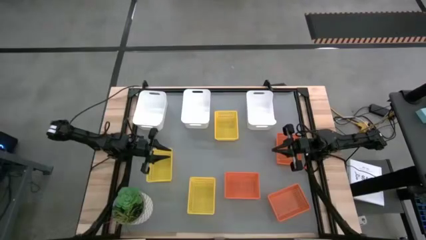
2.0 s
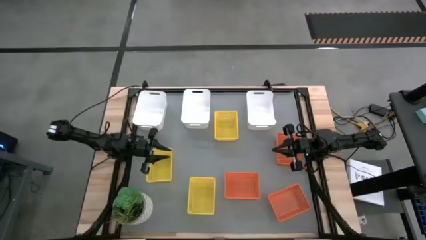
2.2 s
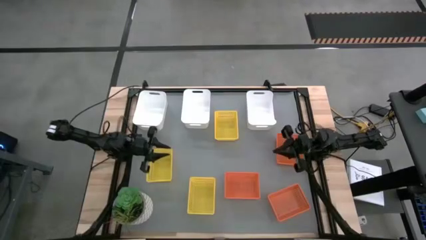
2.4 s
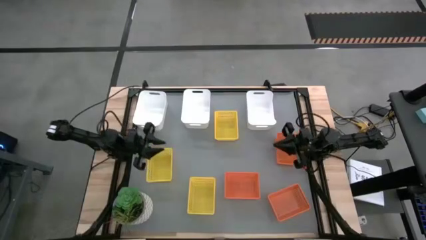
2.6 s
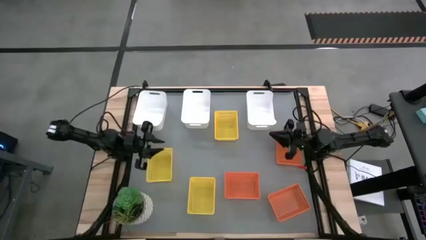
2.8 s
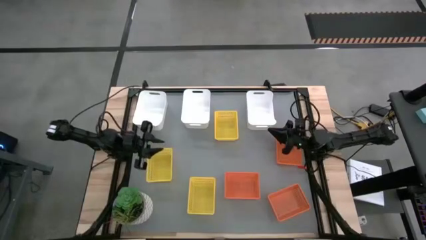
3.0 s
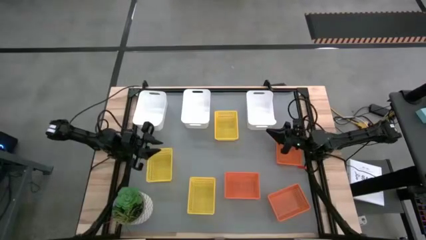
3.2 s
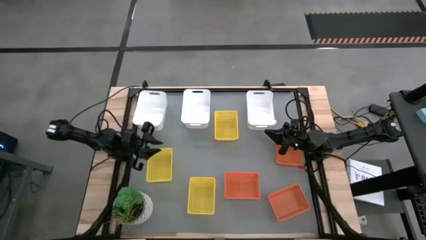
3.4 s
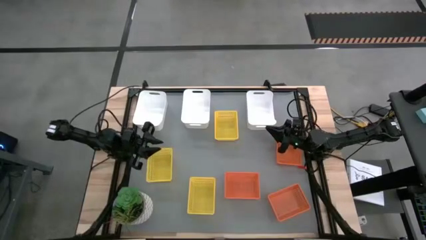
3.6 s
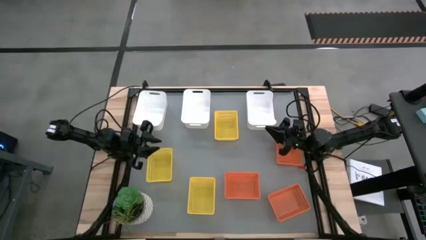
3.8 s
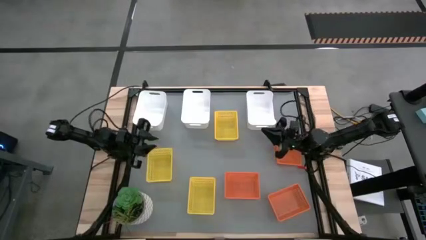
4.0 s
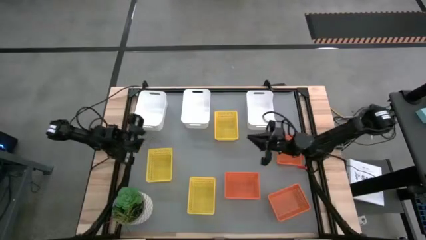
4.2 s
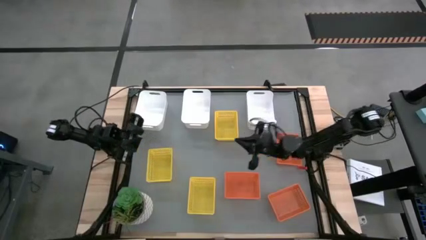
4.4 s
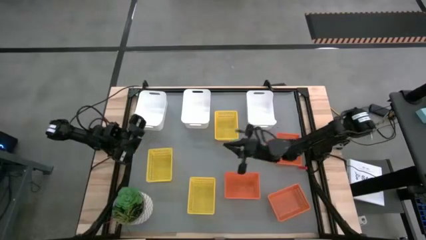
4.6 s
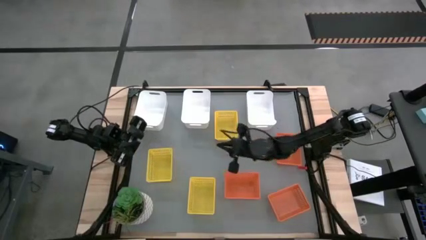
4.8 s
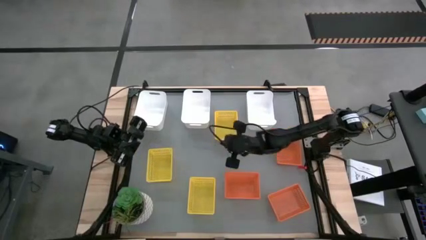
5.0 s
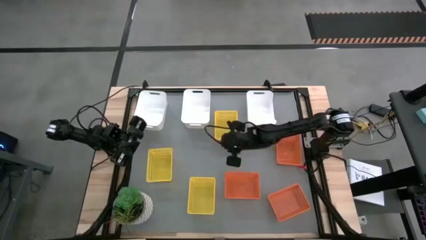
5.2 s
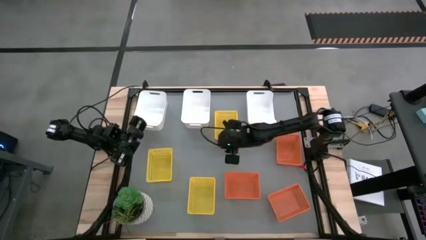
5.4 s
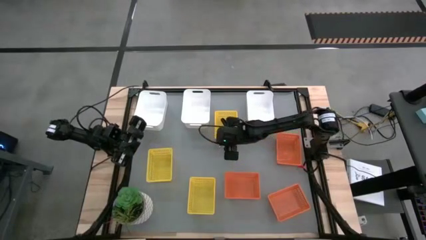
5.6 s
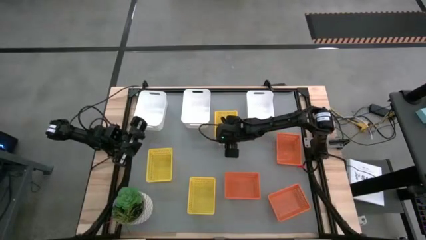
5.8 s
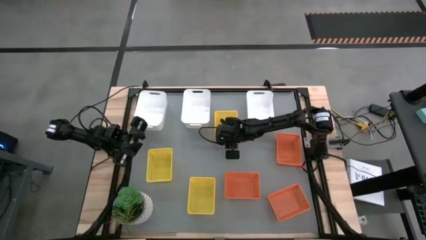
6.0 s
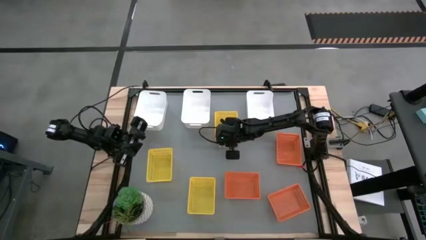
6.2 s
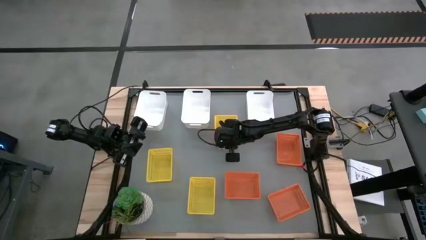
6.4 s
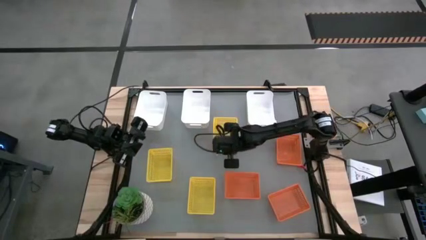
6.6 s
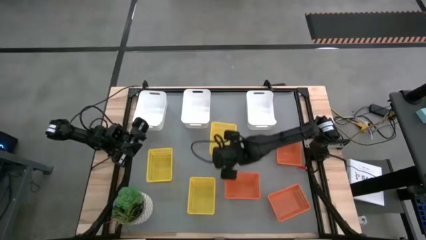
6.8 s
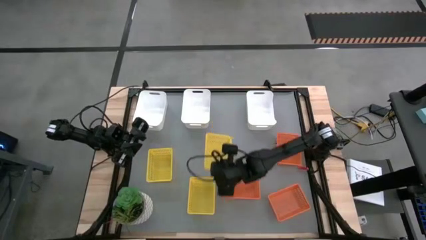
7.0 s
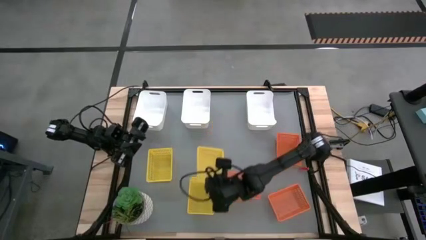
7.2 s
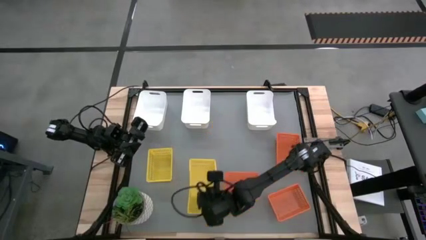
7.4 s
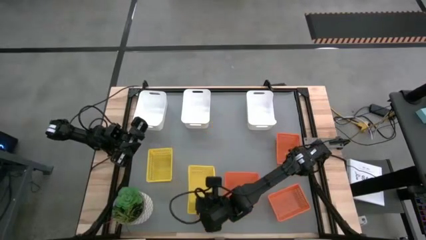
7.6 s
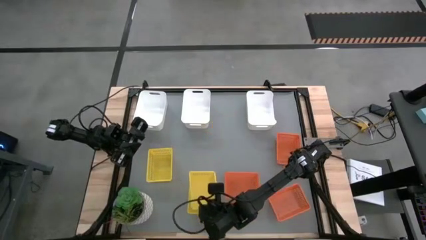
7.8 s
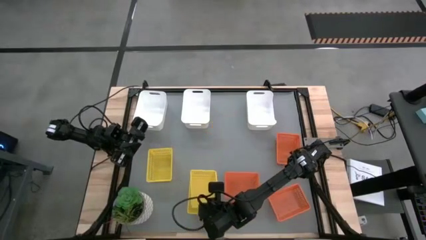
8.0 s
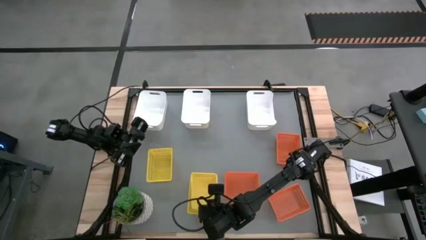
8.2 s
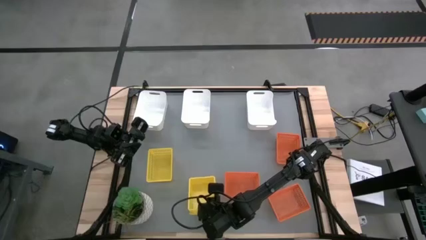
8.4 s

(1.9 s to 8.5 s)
Stack the top yellow bin on top of the bottom yellow bin

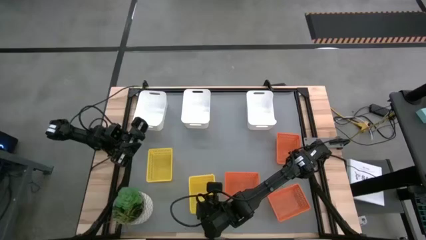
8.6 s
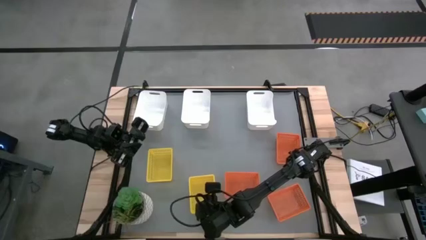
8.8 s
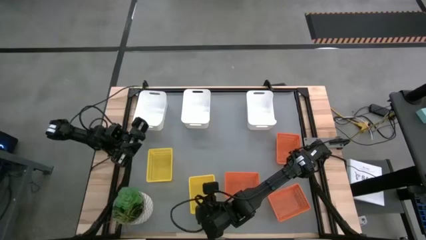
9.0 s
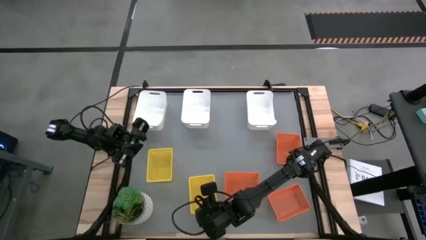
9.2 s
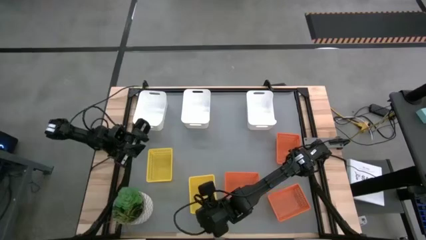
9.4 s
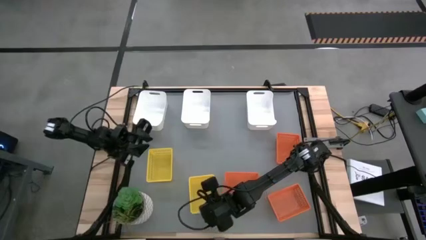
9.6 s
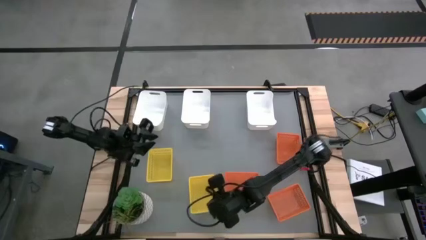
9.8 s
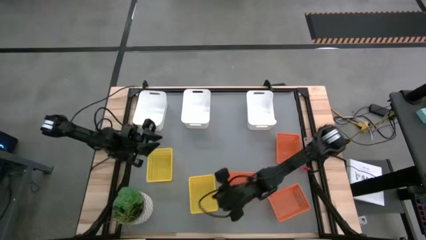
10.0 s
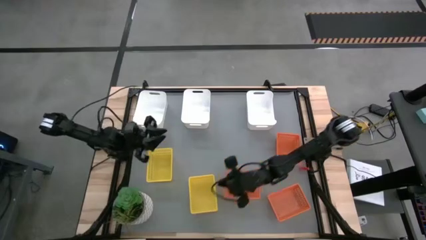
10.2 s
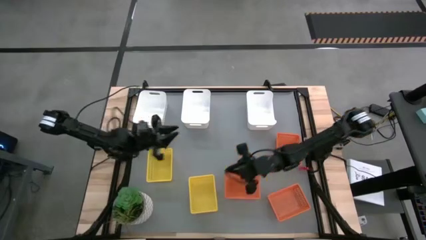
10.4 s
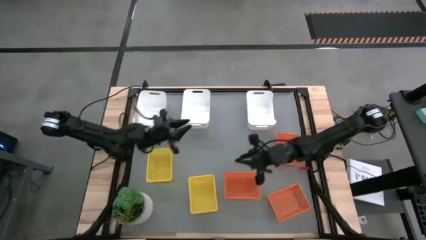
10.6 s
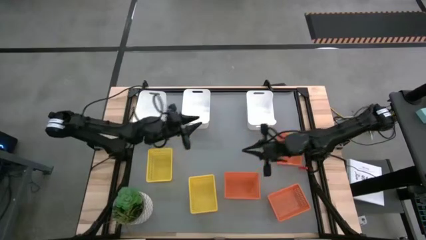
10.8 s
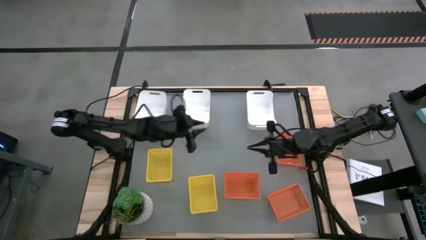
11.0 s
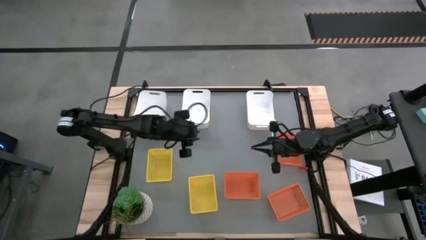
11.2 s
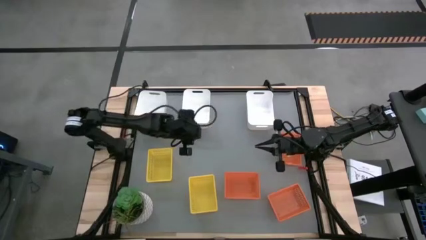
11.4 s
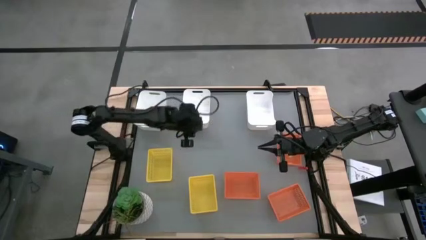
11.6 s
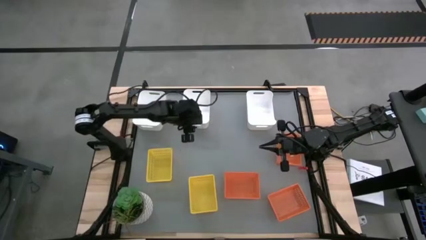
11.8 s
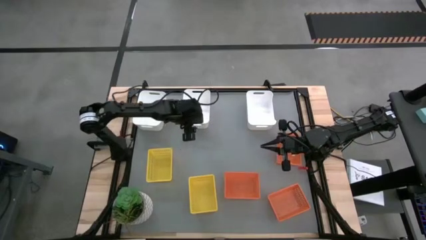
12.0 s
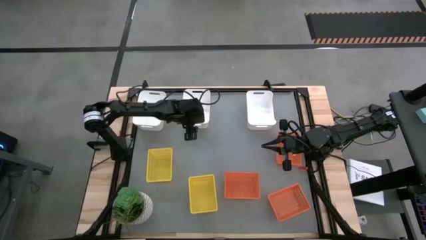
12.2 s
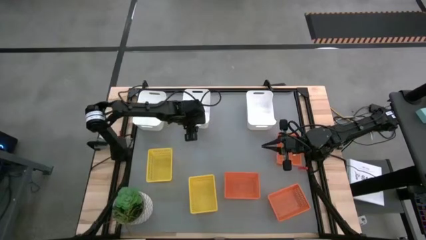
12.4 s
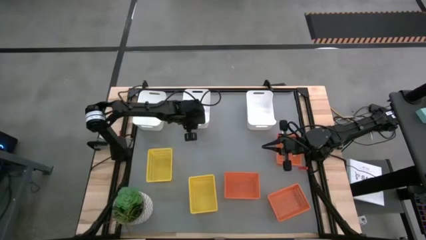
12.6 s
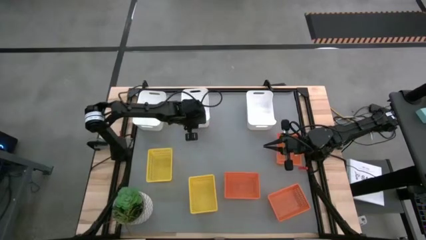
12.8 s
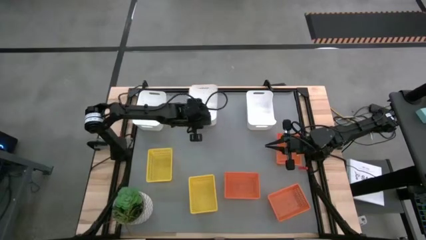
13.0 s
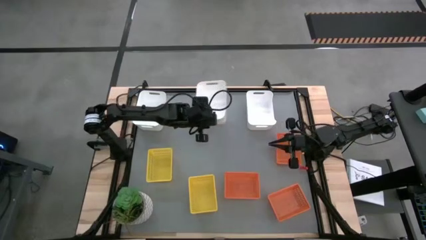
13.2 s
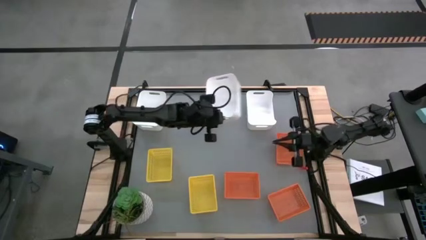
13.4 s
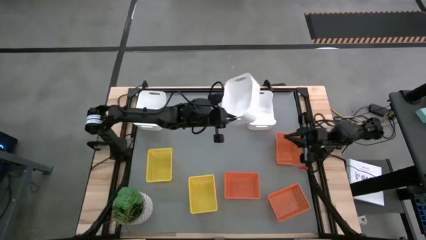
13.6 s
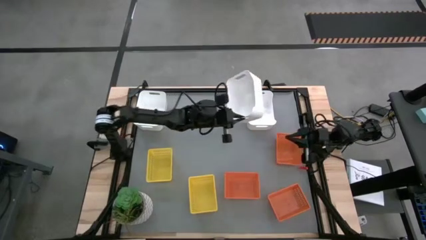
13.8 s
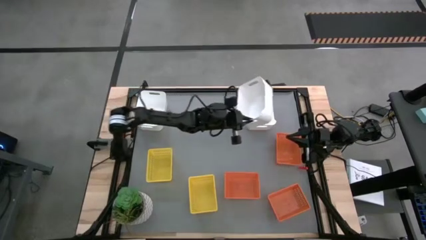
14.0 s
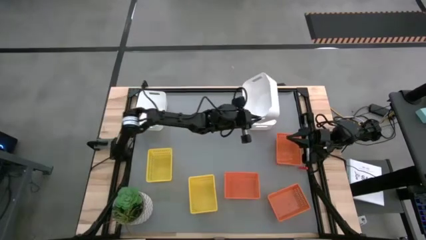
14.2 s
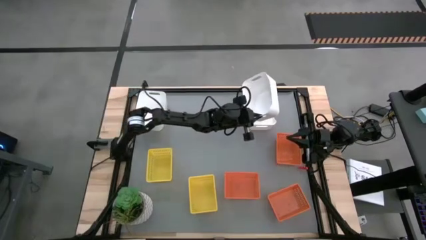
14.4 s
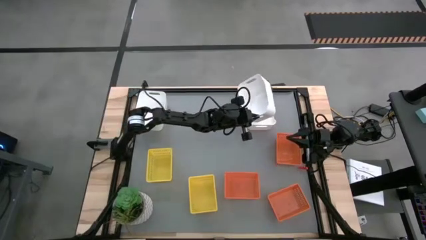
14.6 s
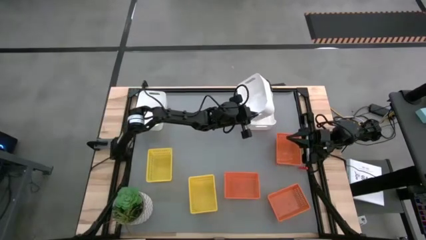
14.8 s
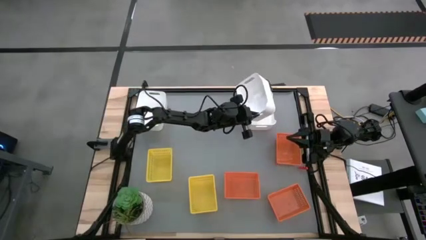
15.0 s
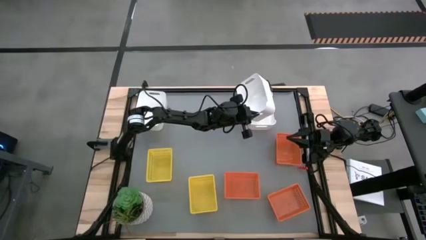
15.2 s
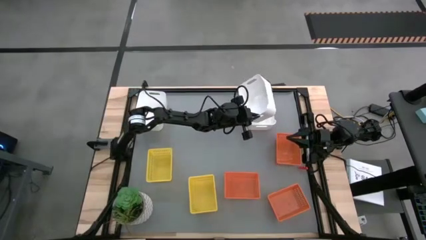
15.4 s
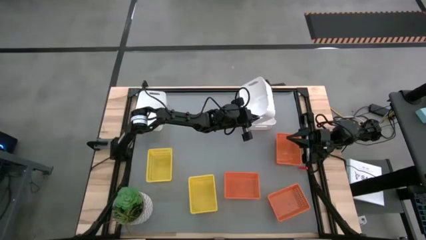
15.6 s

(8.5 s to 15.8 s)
Stack the middle white bin on top top of the right white bin

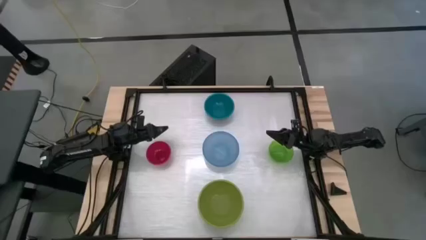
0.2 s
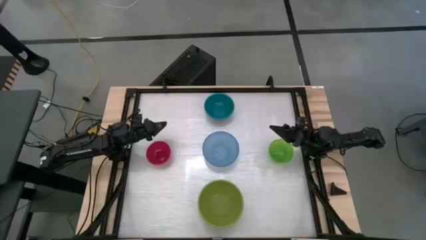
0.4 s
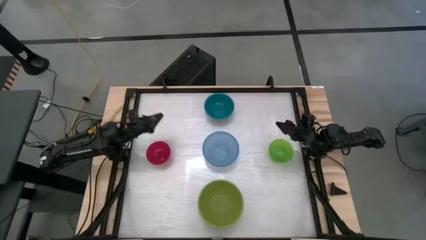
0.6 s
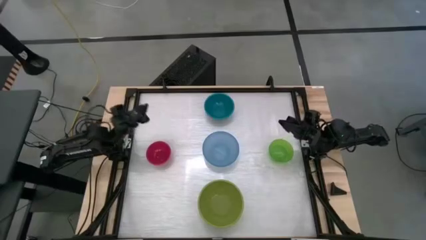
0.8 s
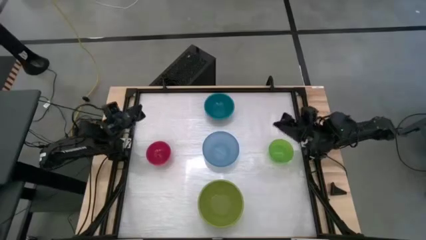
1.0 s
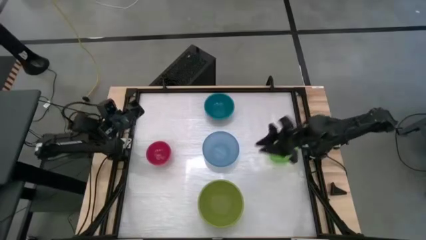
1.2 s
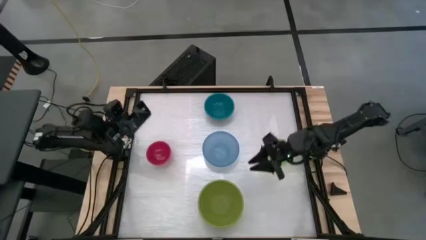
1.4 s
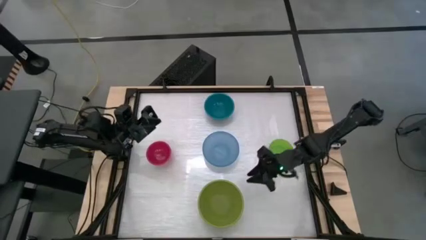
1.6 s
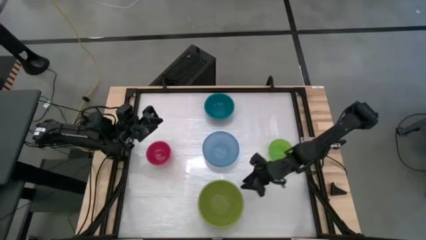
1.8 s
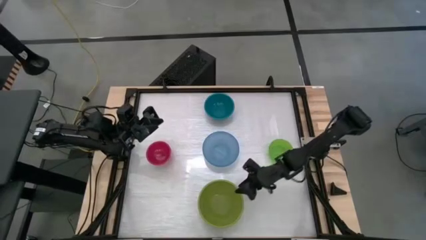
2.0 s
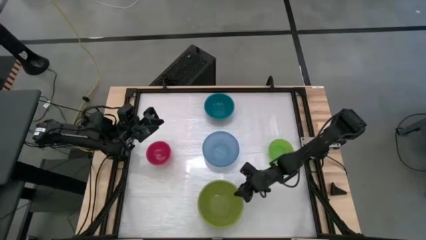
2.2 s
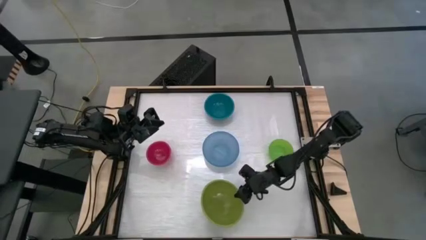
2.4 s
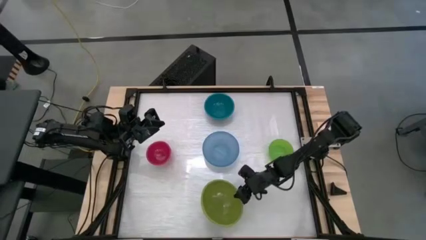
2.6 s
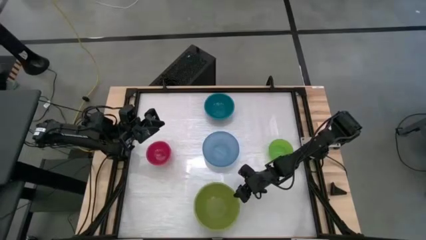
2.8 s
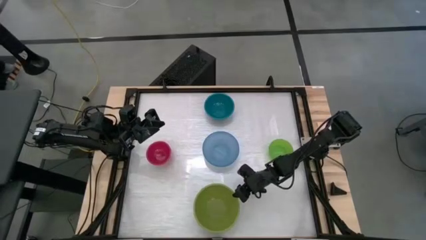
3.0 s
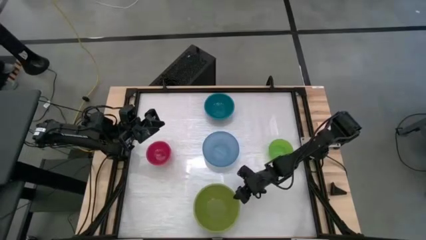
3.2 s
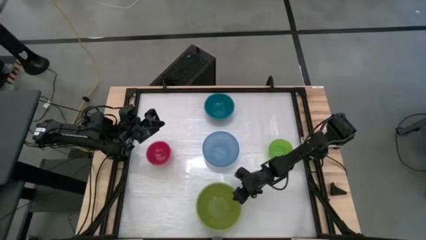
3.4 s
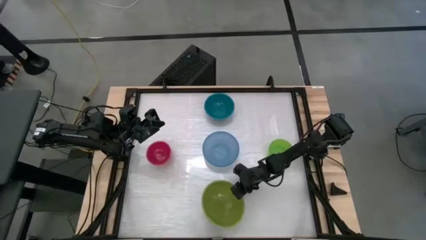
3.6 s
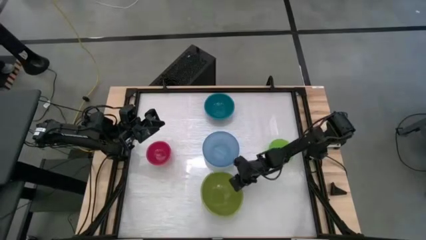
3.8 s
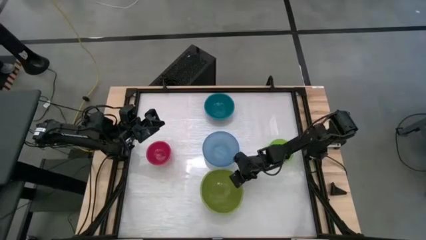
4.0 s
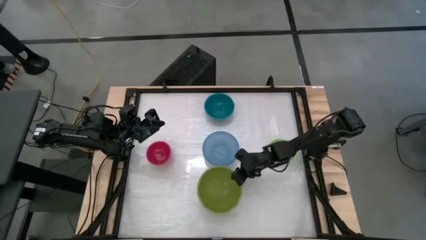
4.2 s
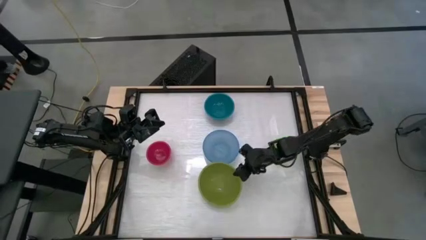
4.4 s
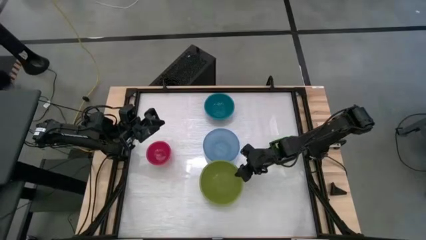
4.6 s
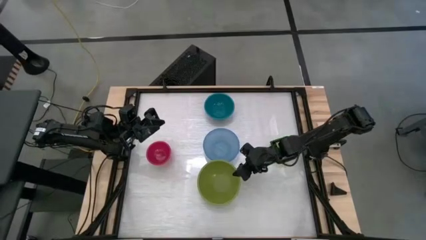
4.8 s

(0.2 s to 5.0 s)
Prepare the light green bowl
